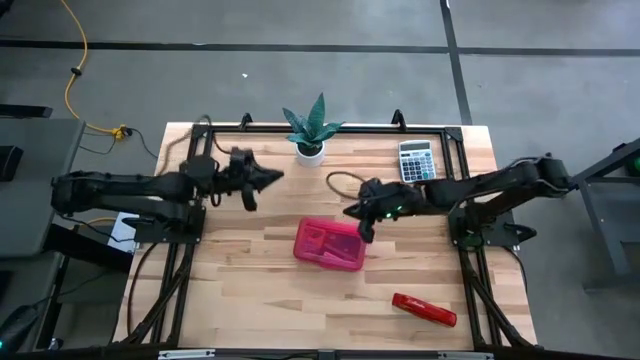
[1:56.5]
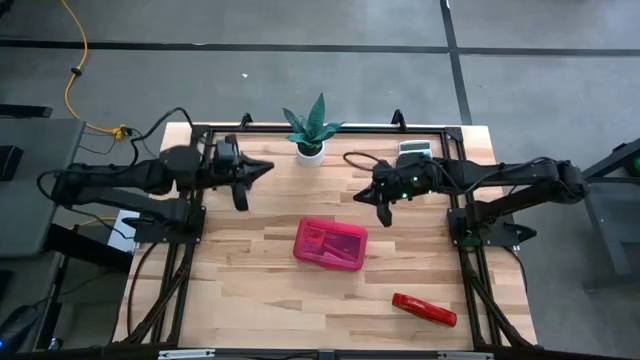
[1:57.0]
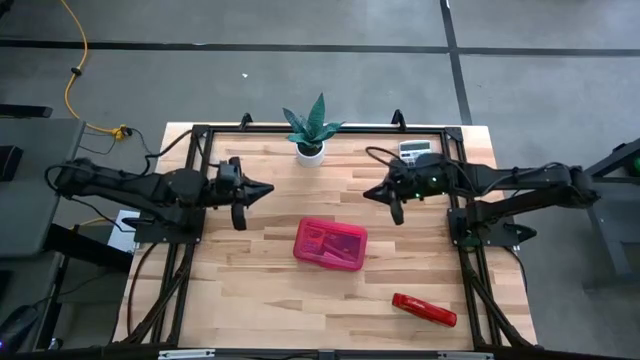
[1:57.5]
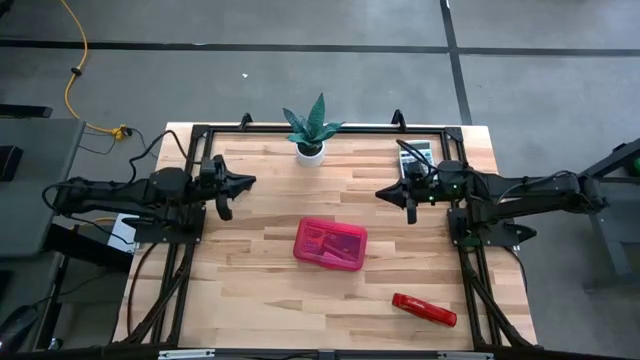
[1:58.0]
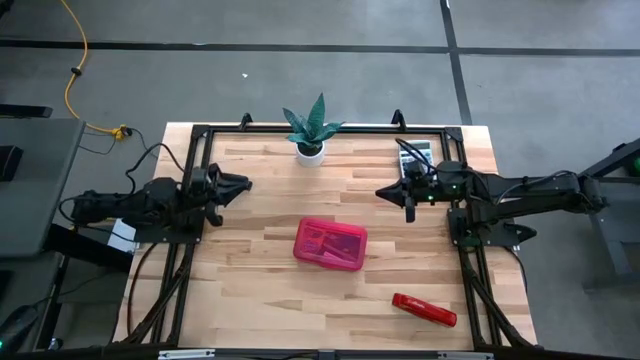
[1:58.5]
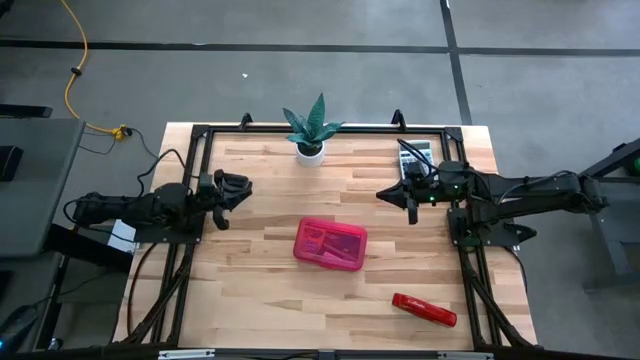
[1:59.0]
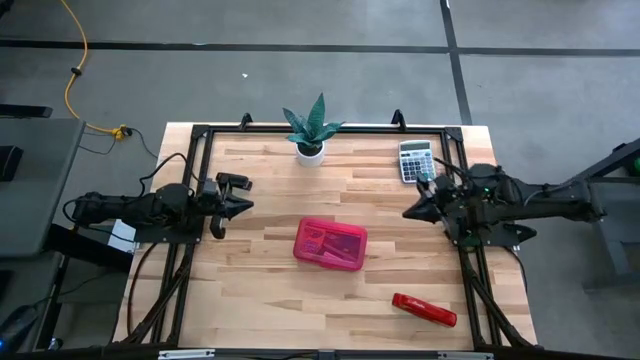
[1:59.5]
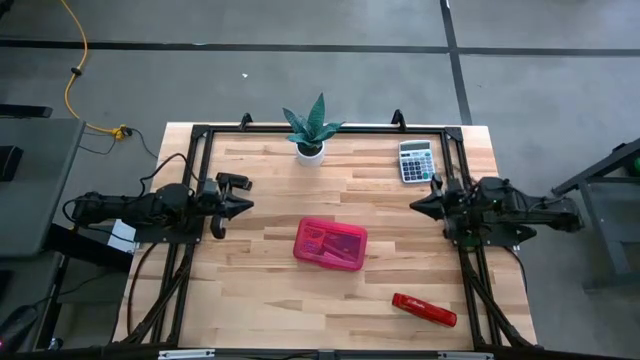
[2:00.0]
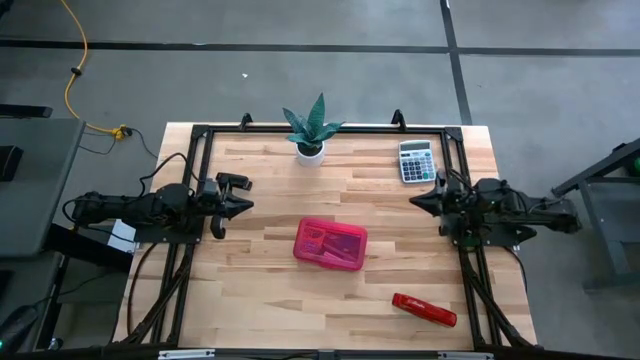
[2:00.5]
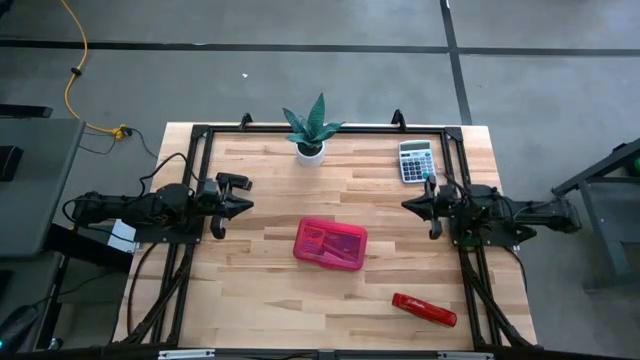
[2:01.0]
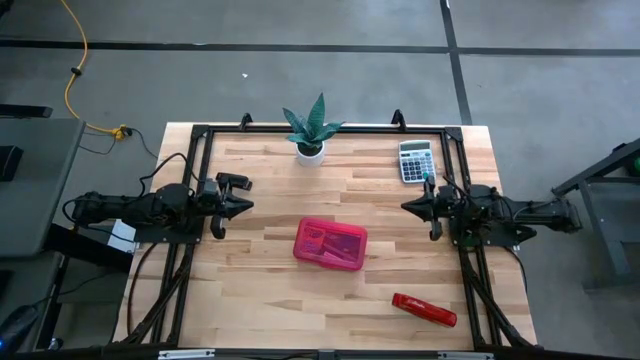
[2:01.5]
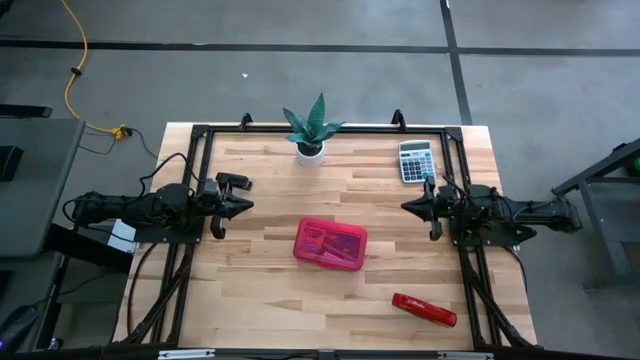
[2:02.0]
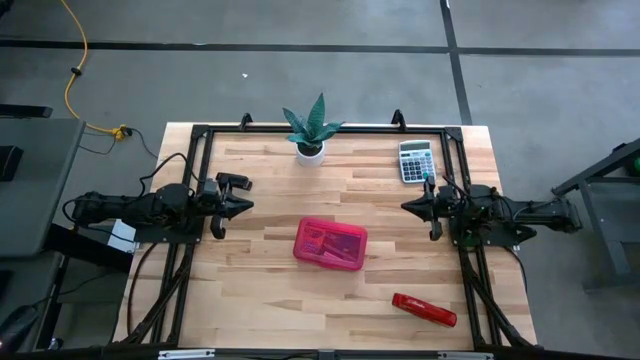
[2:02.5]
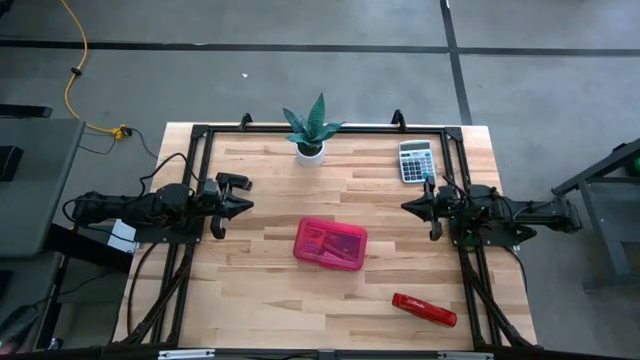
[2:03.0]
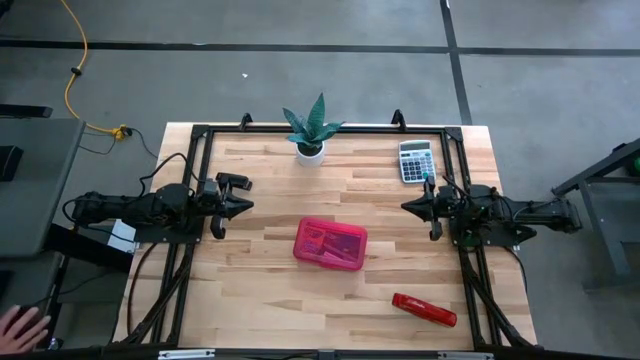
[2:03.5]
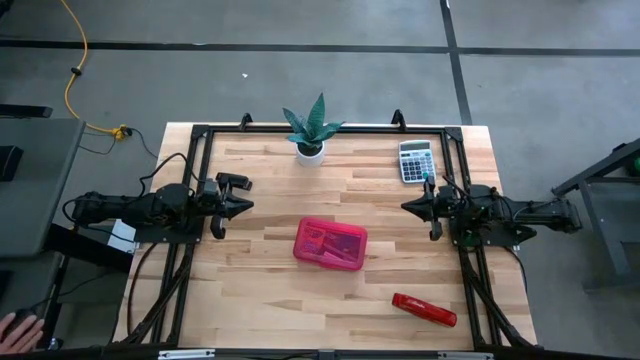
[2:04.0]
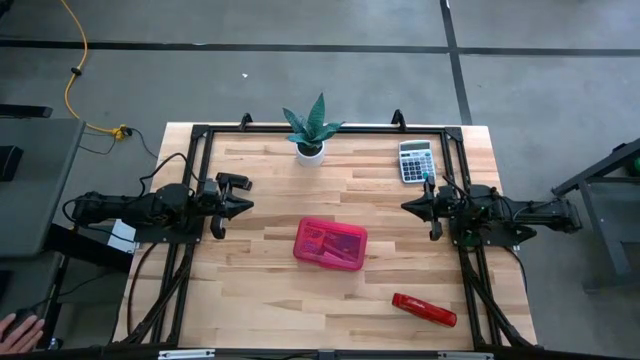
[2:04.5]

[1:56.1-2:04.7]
Task: Pack school essentials
Return to Home Position

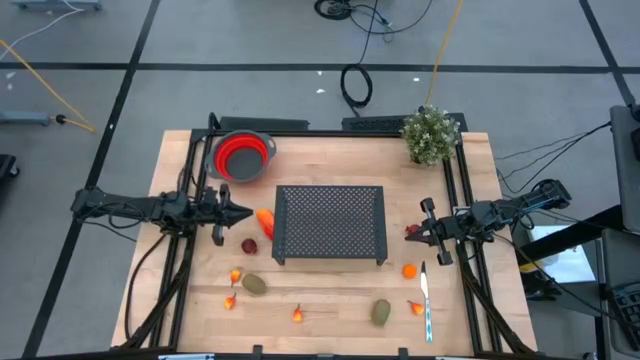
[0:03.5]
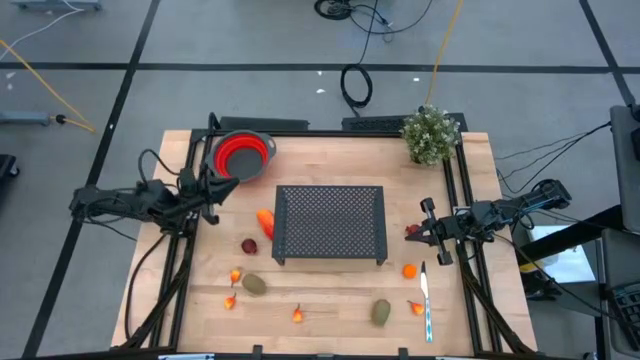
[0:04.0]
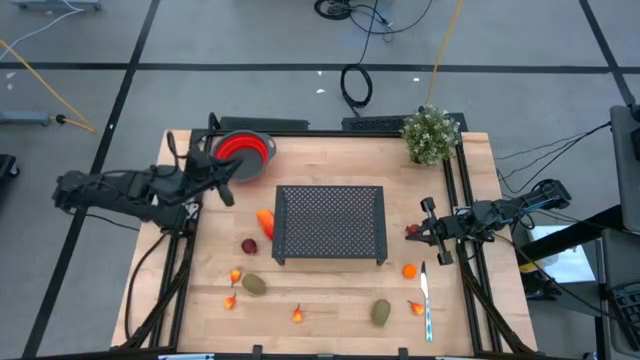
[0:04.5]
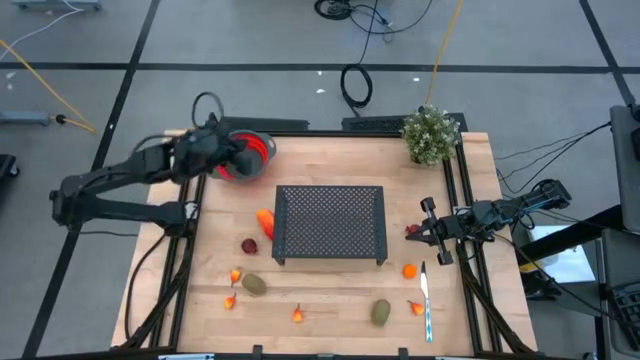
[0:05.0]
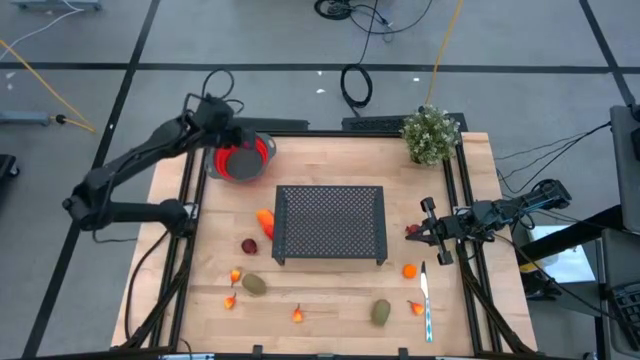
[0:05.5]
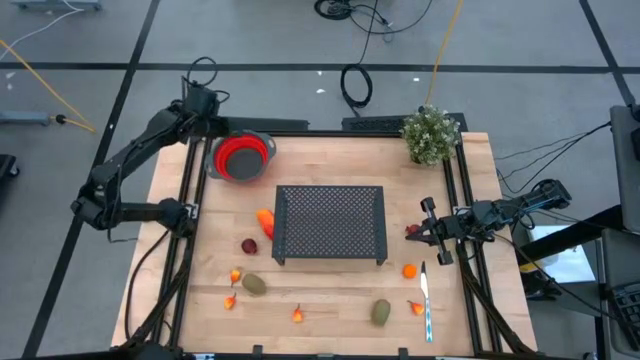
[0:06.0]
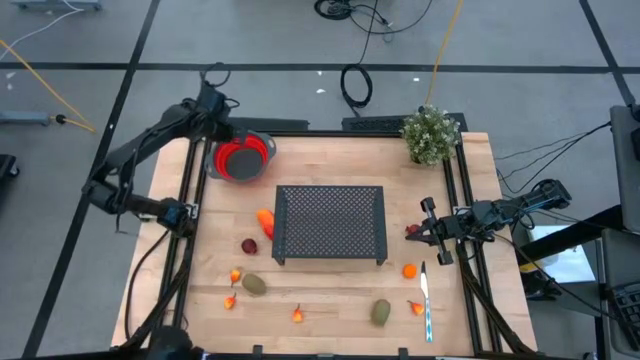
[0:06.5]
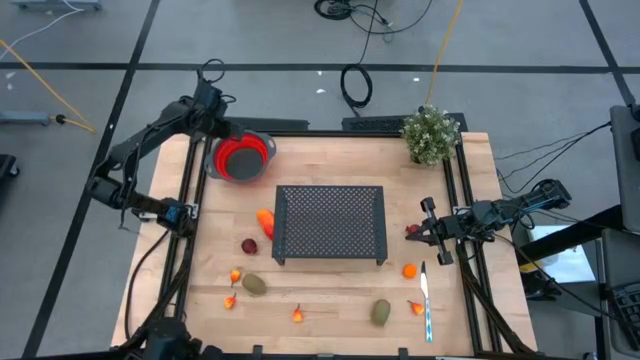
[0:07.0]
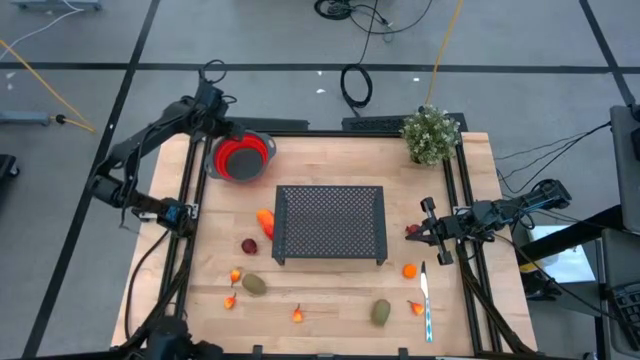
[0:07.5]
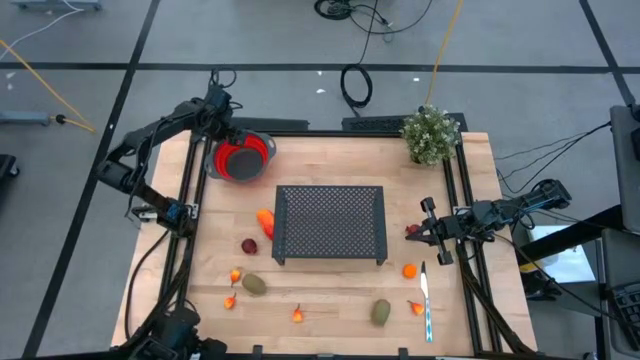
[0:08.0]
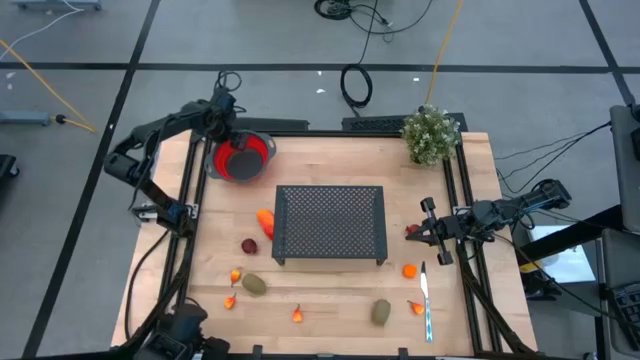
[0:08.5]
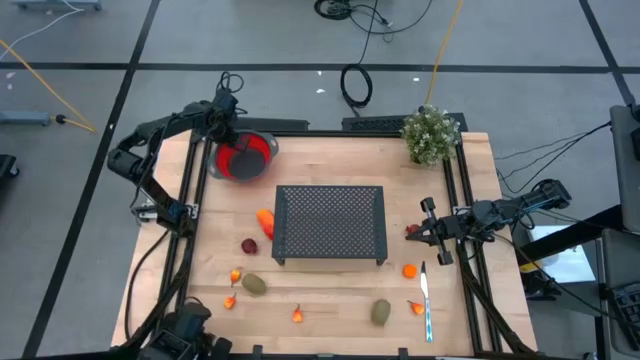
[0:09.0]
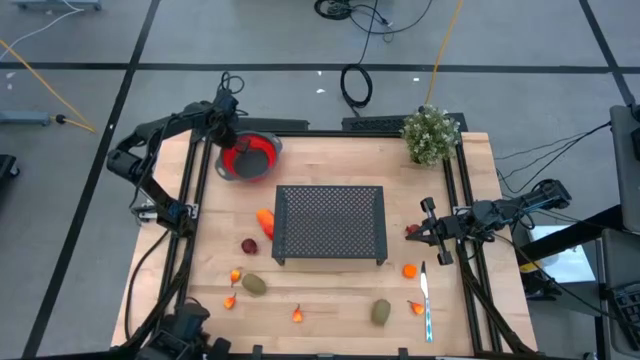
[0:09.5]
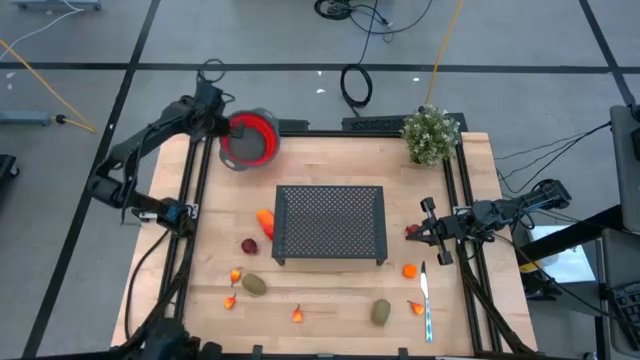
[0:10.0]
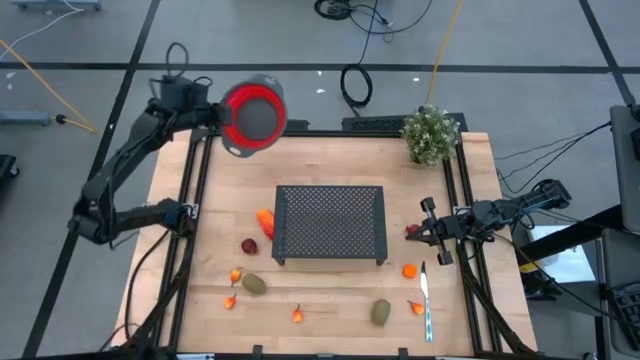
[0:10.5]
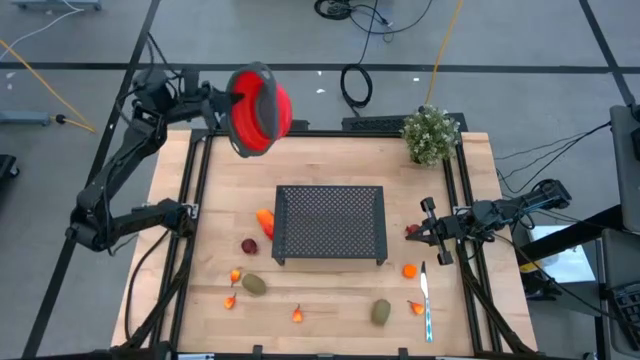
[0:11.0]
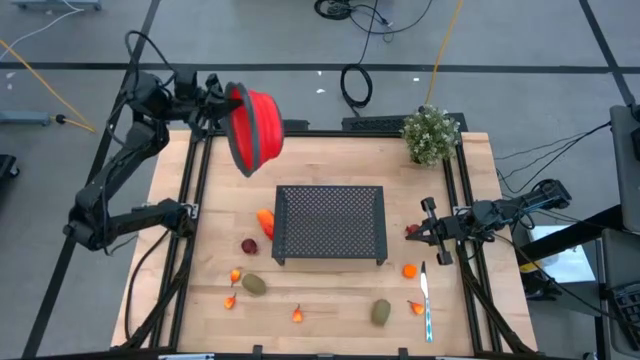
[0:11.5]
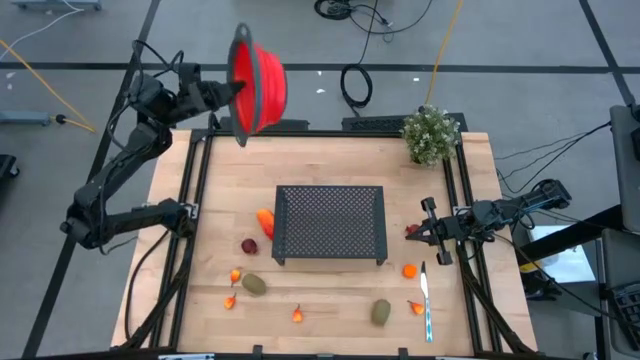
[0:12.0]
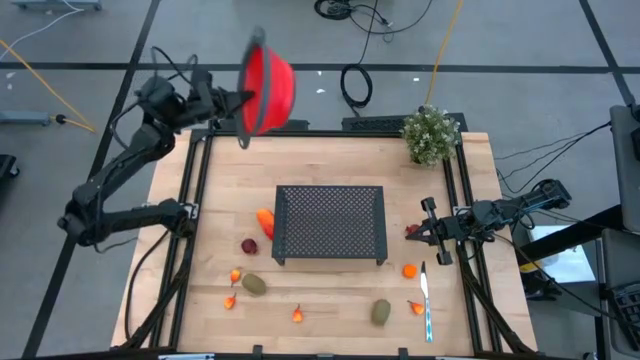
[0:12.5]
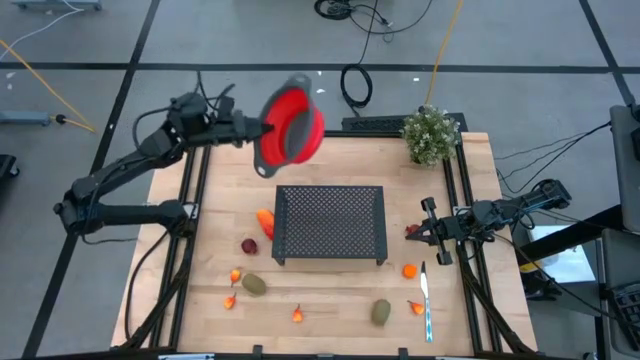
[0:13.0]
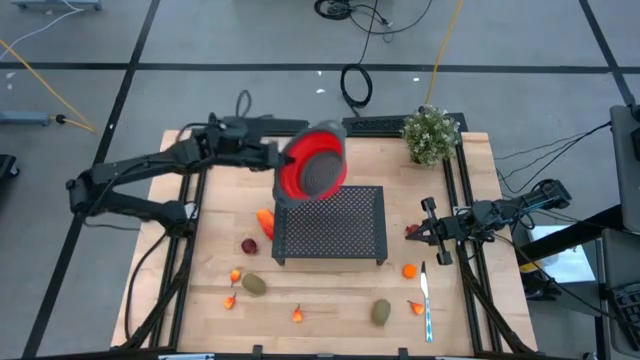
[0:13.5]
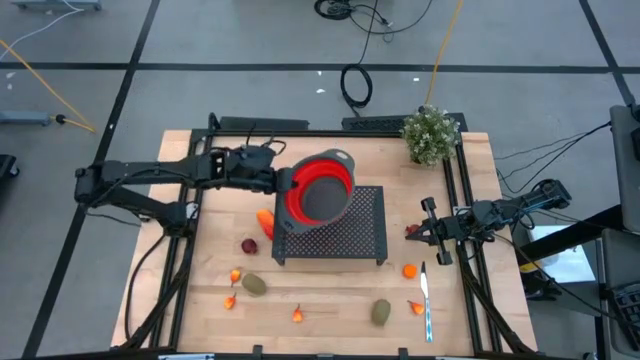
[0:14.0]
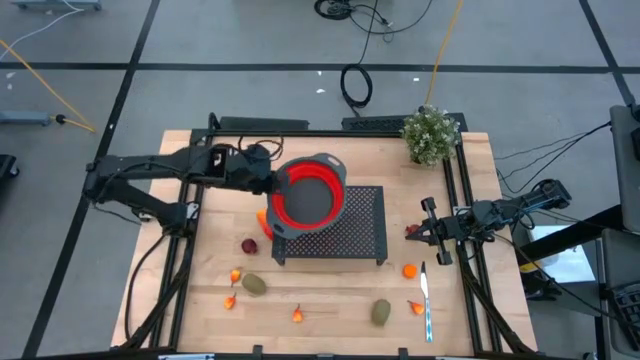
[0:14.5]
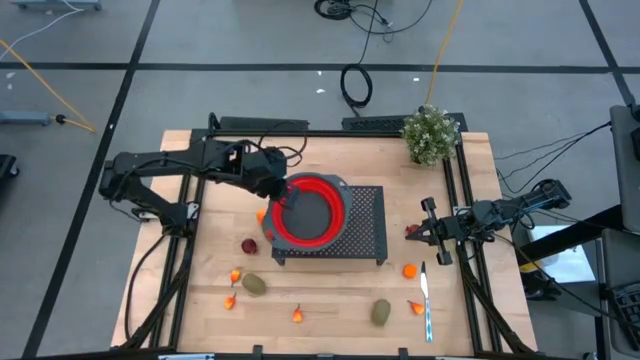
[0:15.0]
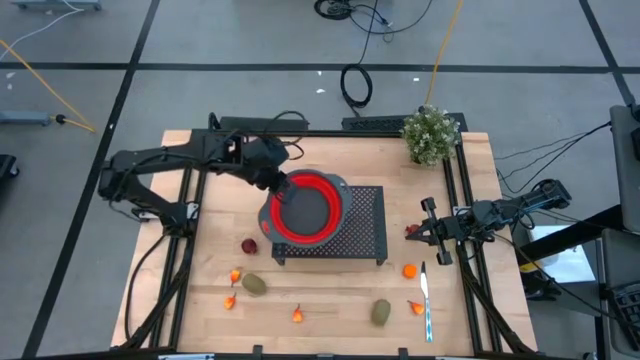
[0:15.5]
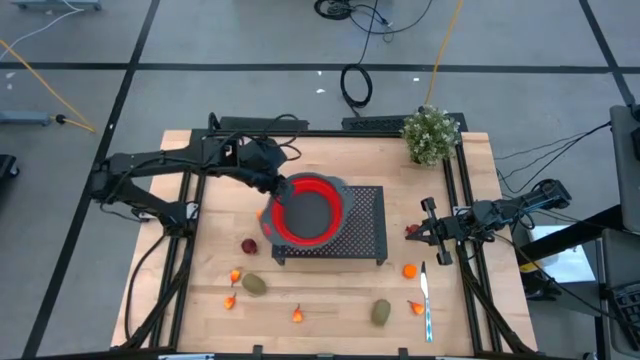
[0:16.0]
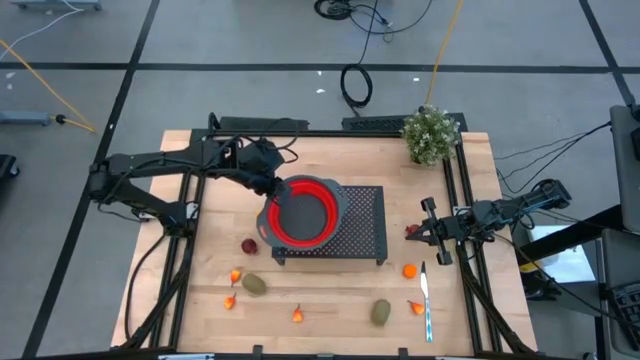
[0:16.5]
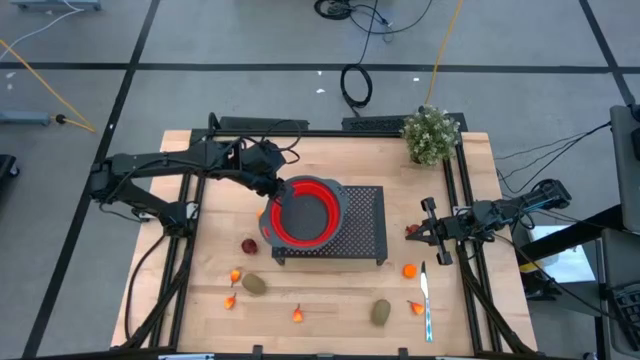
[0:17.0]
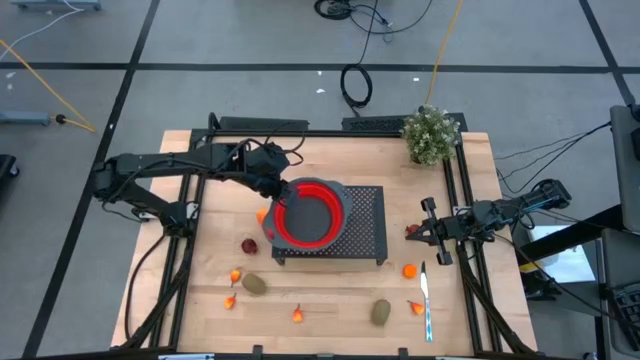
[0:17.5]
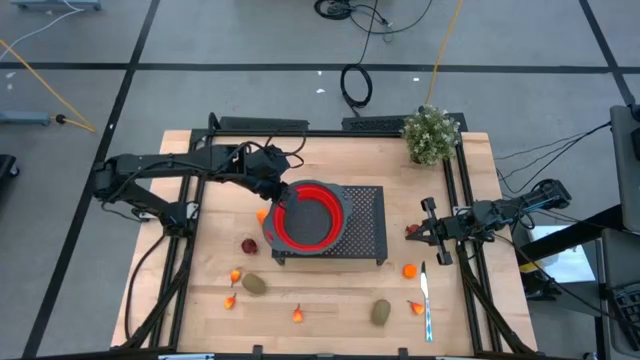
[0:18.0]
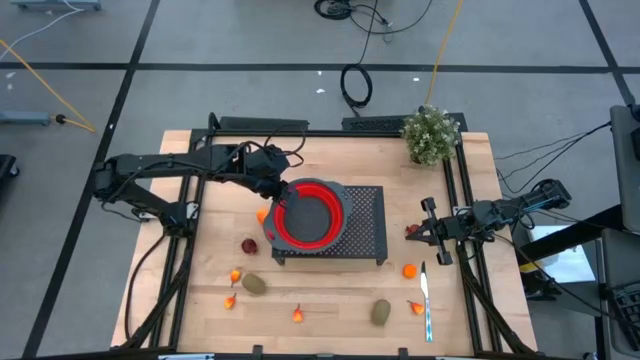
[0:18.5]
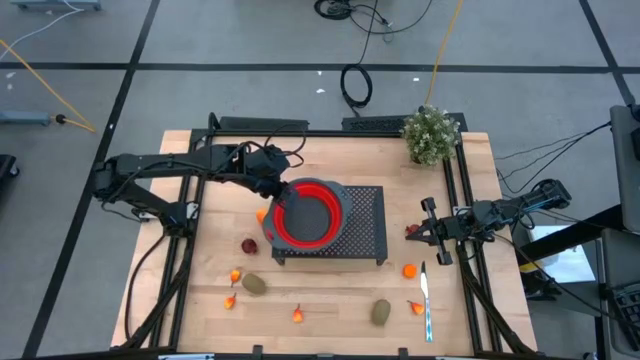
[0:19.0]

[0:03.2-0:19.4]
Task: Pick & Place Fruit
Put the red strainer bowl on the shelf
